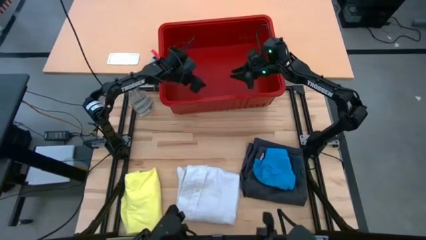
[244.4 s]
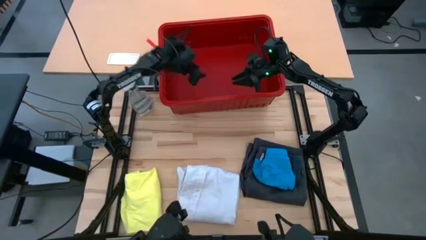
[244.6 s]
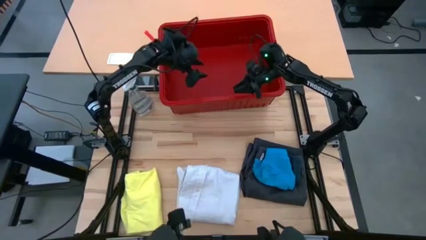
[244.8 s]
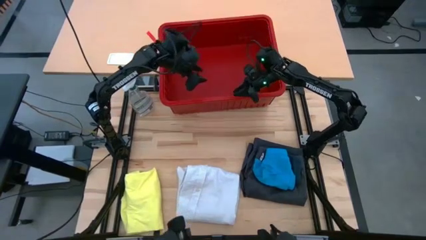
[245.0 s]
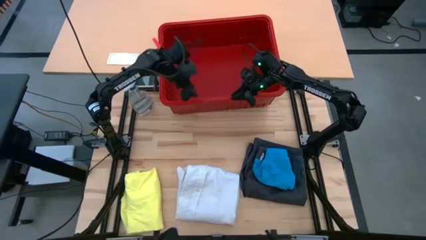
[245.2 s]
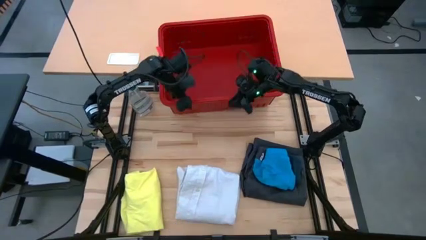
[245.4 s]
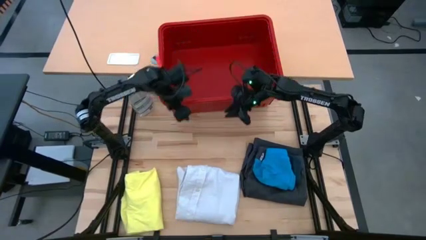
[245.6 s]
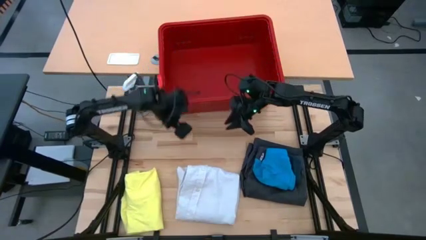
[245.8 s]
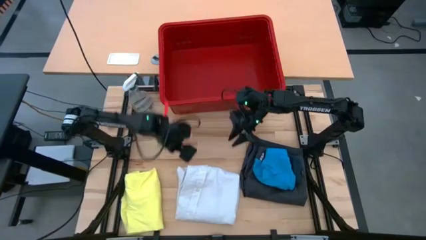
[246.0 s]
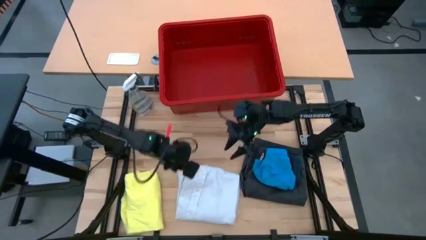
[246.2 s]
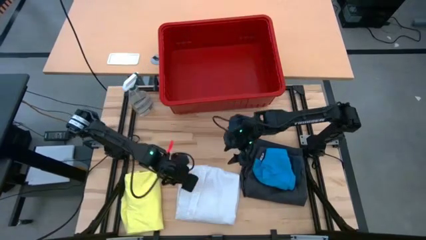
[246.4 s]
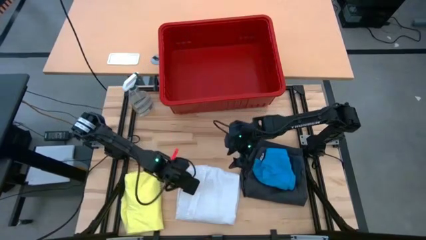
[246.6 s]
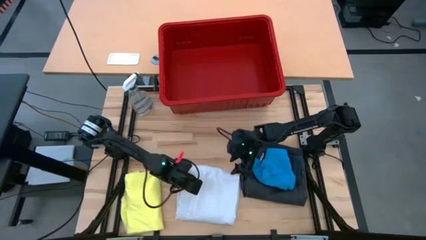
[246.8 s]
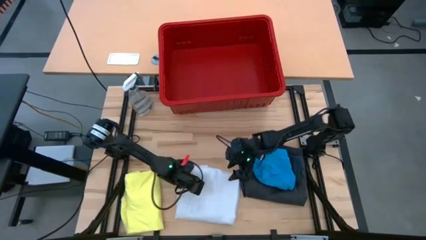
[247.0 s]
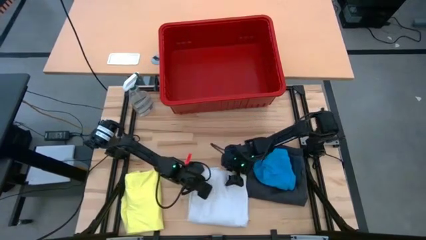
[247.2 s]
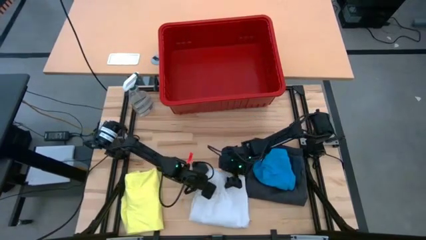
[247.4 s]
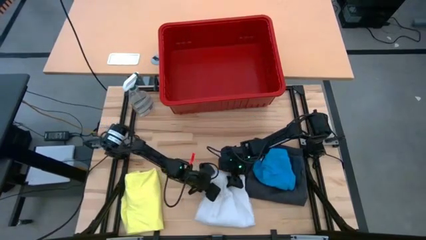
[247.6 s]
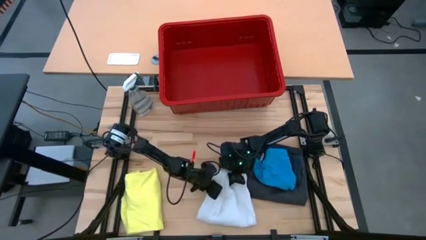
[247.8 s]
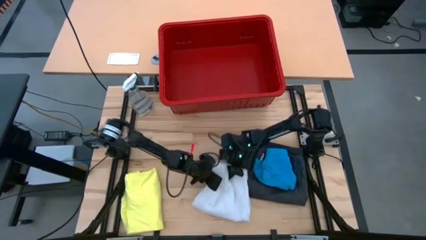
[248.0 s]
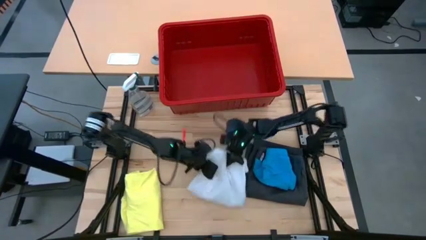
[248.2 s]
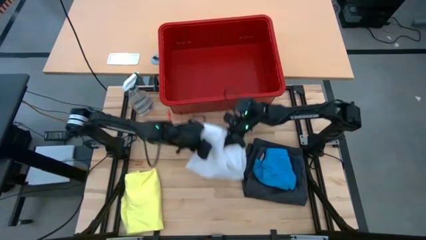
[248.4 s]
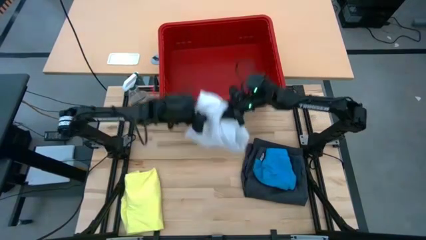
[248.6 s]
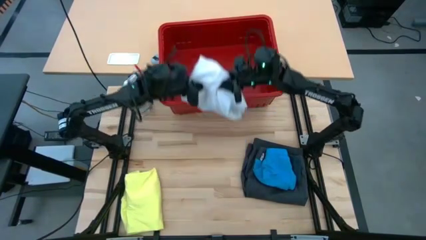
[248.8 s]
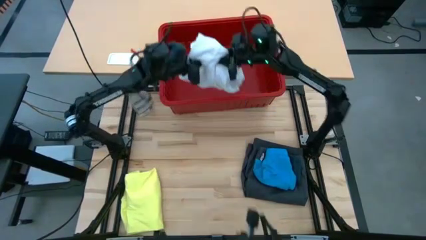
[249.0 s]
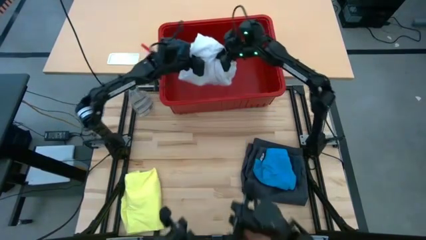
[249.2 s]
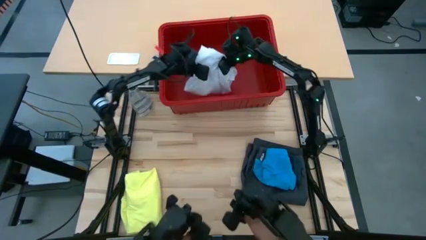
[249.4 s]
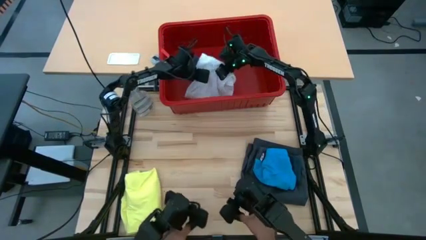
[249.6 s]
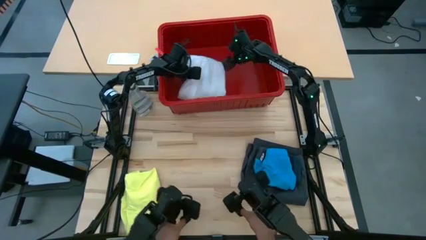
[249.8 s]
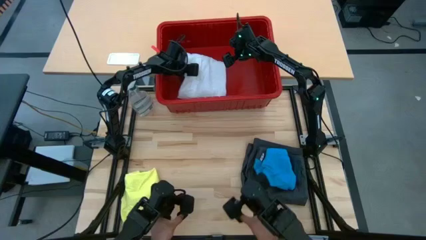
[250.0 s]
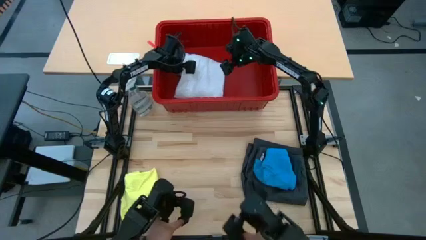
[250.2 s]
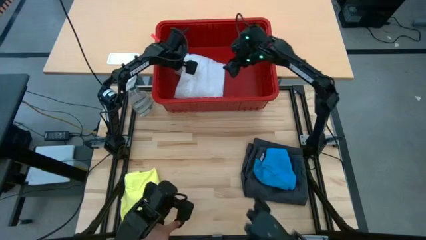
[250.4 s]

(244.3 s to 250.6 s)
Task: Fold laundry
Put the folded white polo into the red laundry bin

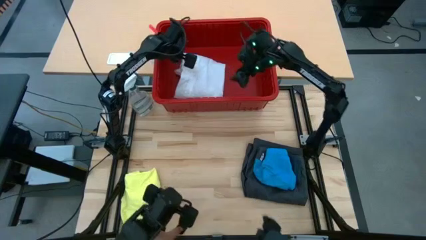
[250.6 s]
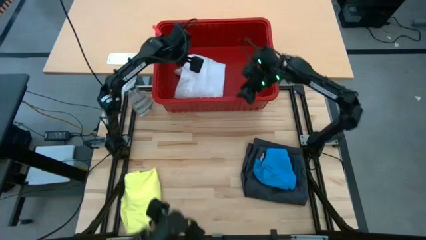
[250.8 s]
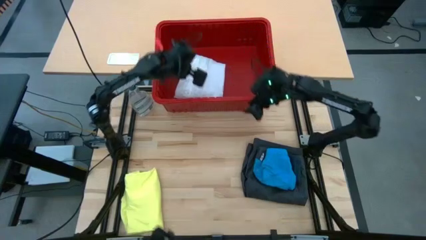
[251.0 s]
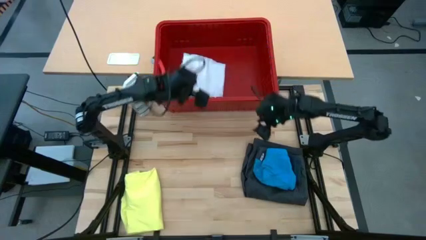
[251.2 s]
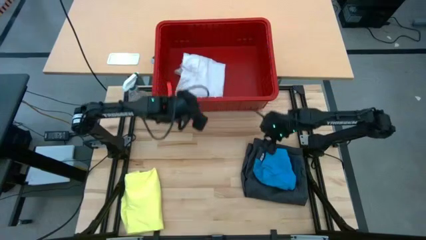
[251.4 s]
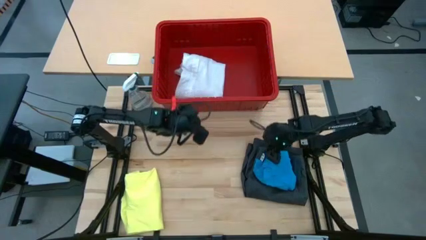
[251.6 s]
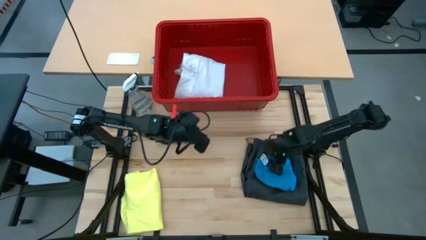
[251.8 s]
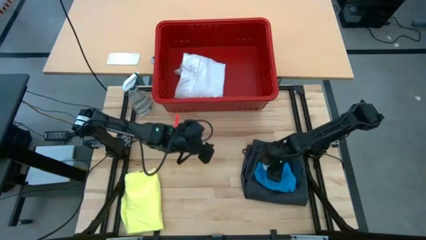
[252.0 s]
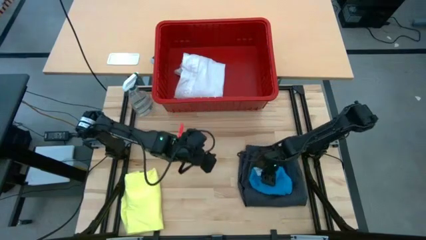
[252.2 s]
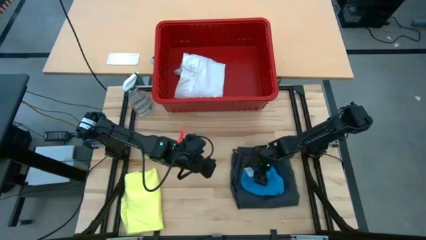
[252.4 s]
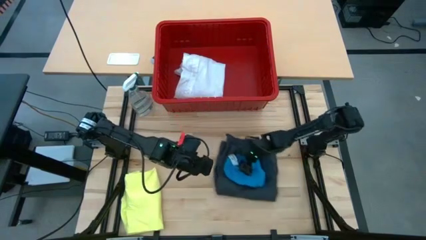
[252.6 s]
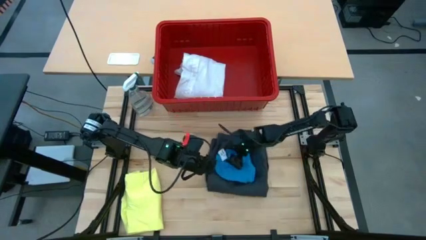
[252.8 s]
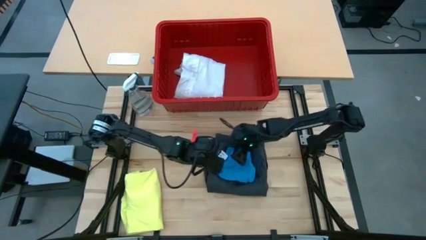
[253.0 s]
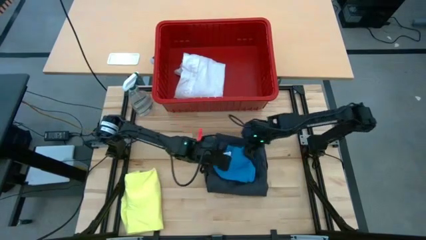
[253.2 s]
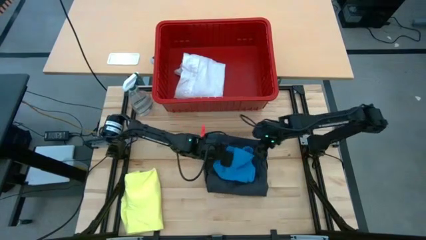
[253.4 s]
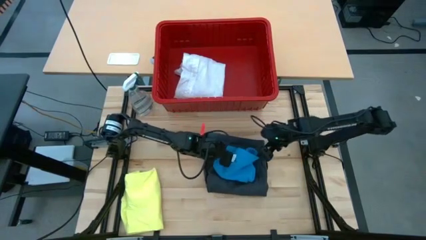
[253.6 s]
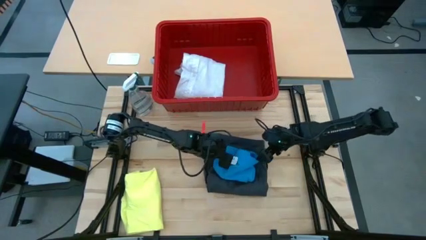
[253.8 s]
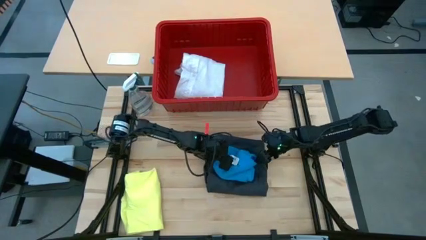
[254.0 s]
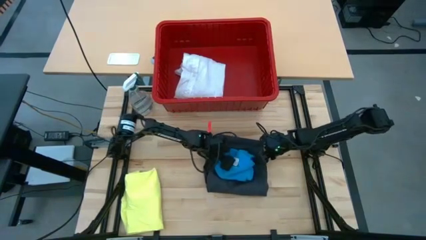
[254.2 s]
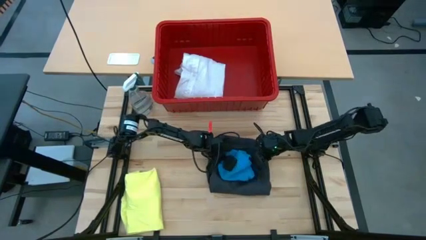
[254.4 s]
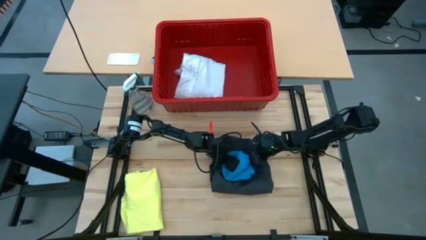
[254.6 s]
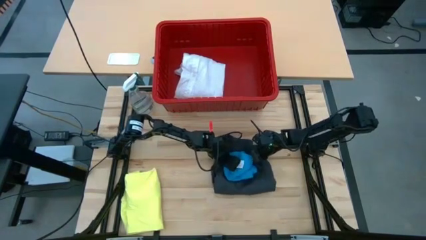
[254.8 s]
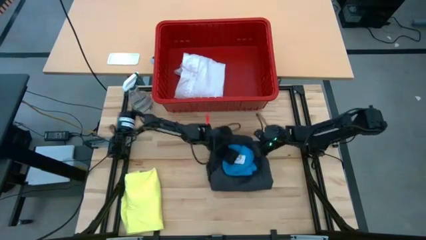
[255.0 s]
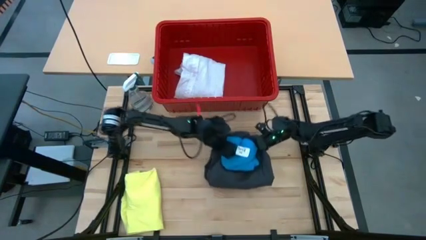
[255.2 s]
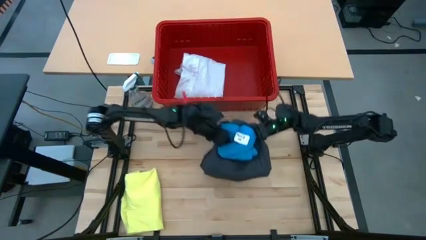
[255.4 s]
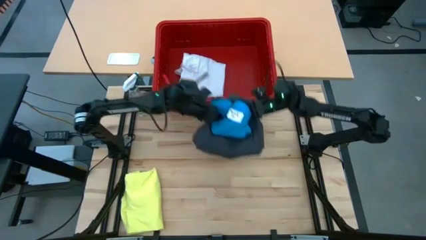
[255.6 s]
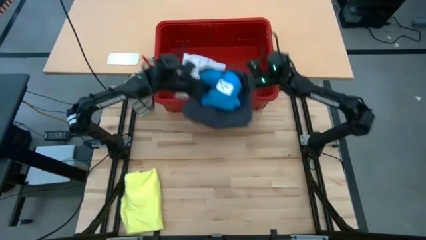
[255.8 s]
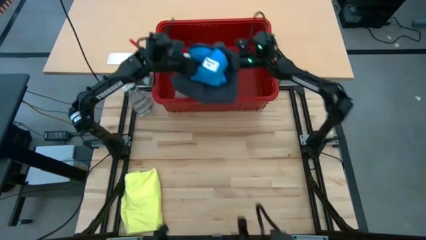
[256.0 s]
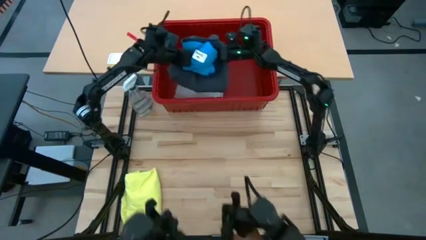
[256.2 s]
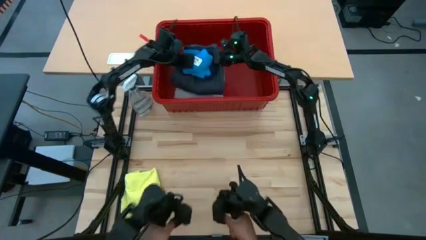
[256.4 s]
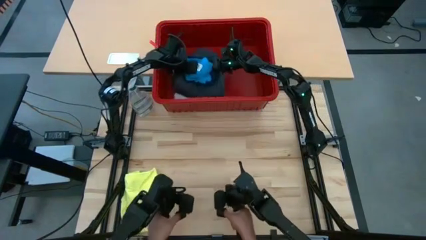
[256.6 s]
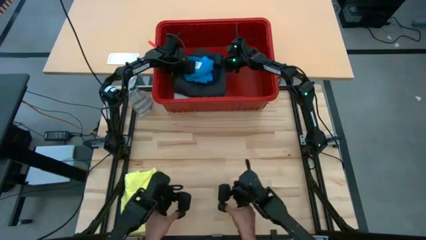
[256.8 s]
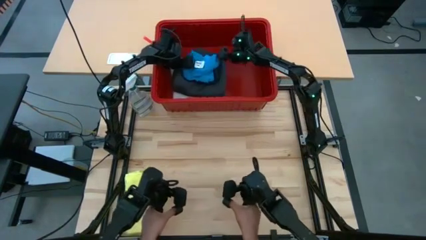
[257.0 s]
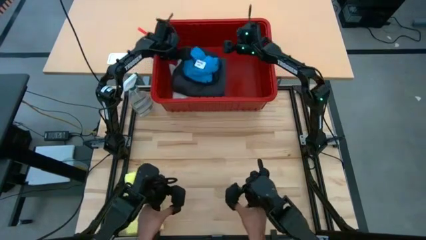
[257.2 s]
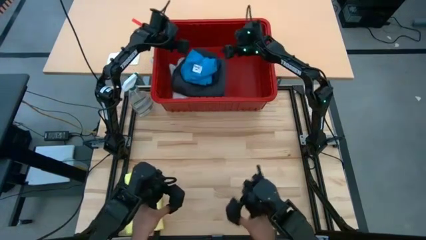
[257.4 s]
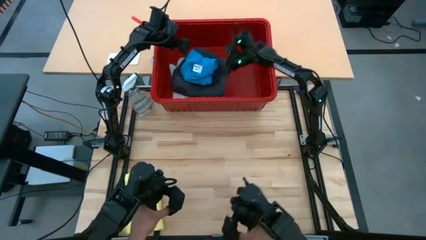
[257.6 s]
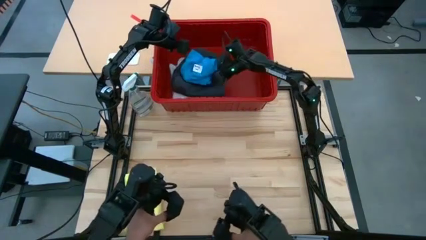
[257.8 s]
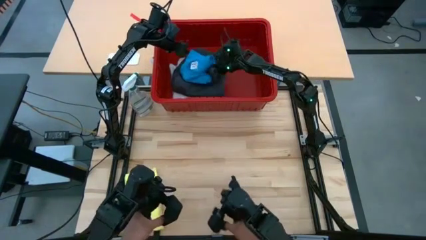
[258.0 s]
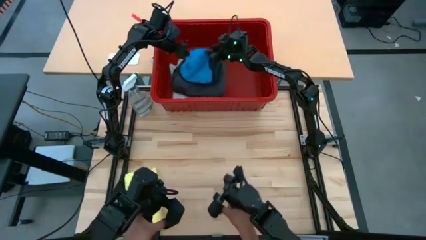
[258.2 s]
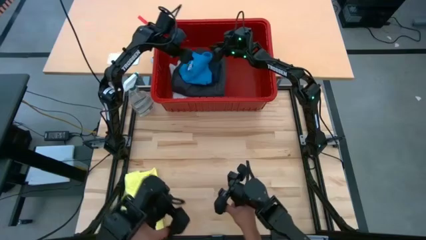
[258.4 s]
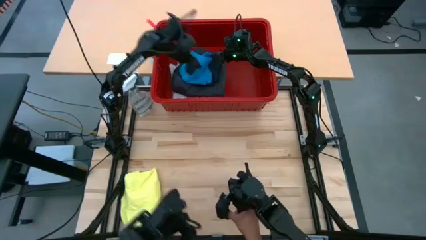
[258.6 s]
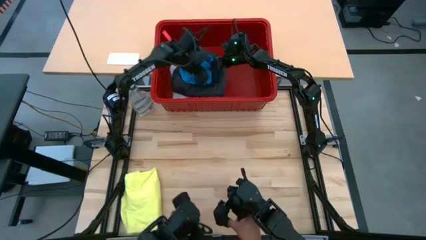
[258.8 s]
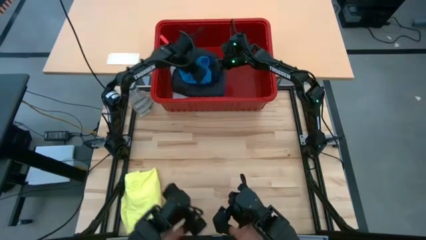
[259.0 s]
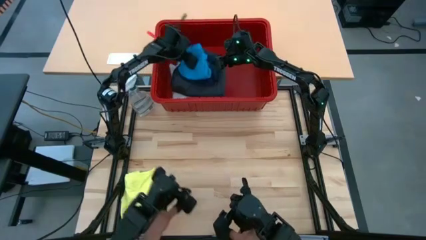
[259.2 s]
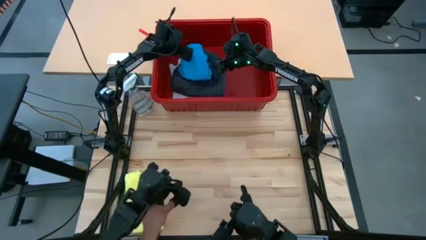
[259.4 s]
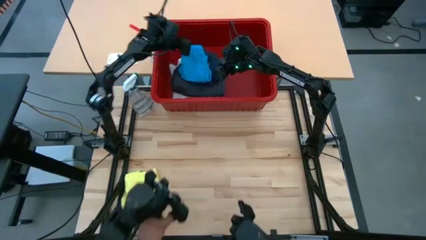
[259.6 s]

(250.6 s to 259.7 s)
Put the stacked folded clothes into the red laundry bin
